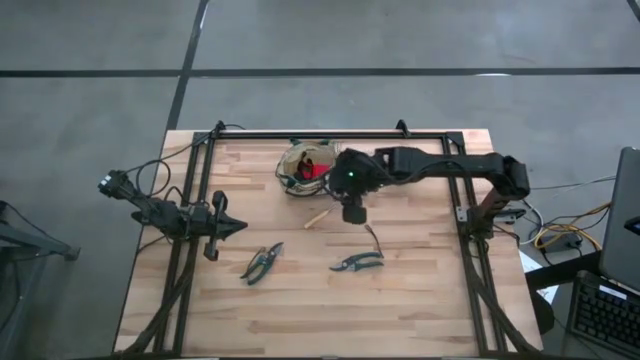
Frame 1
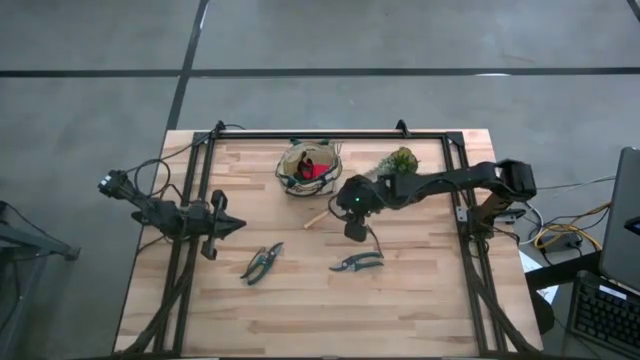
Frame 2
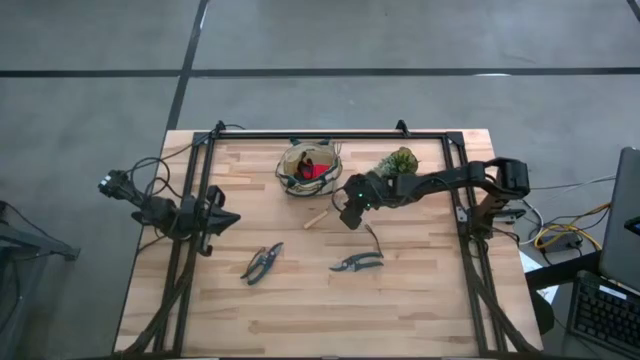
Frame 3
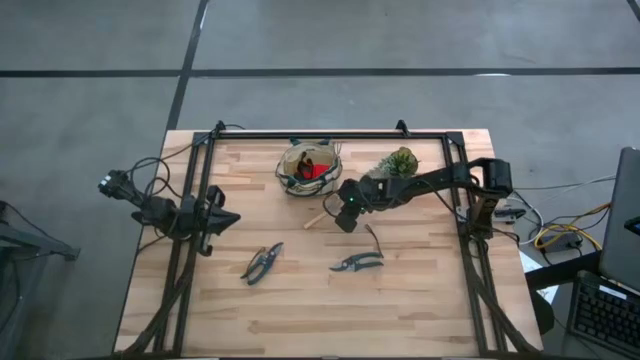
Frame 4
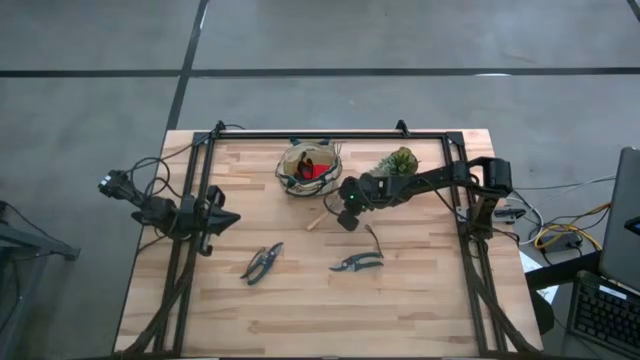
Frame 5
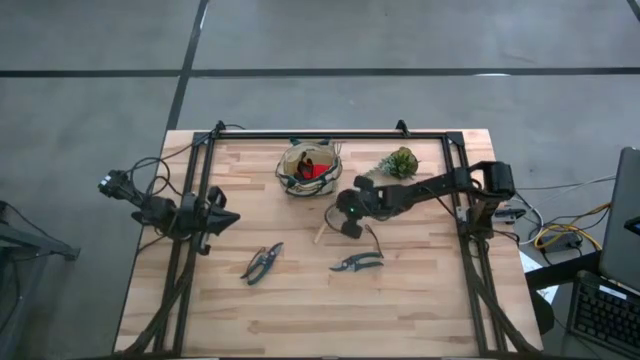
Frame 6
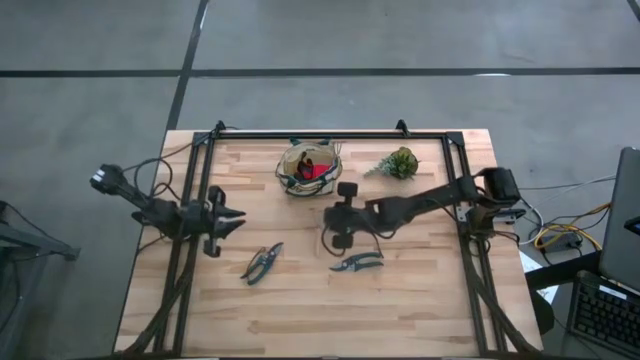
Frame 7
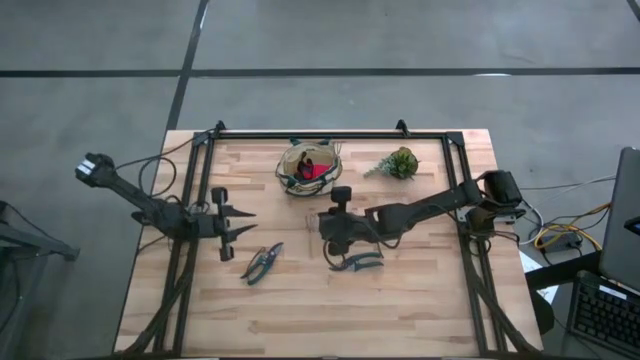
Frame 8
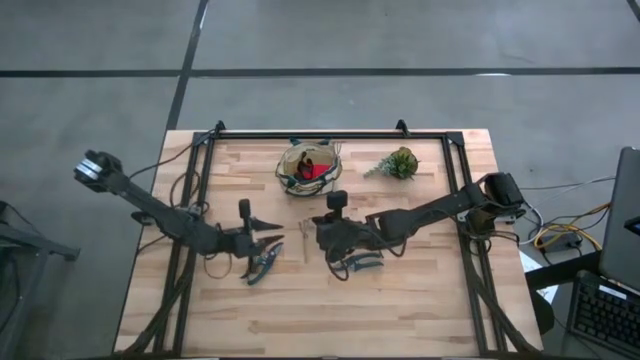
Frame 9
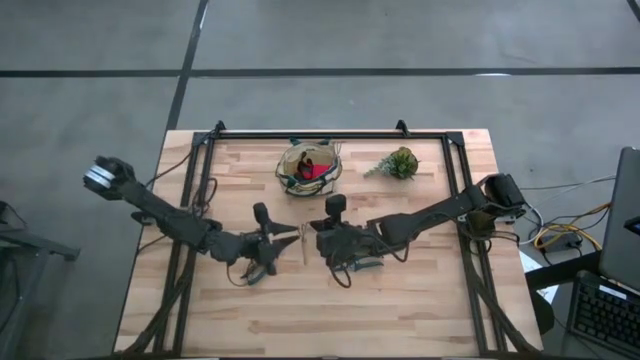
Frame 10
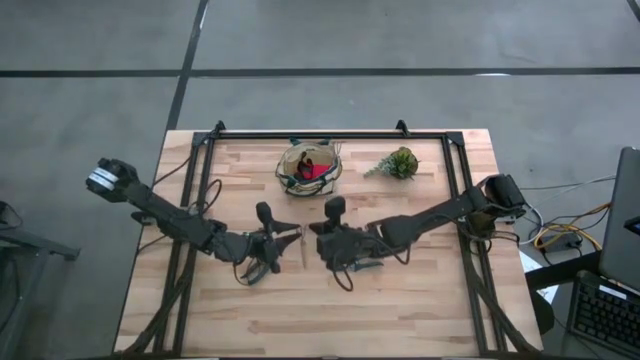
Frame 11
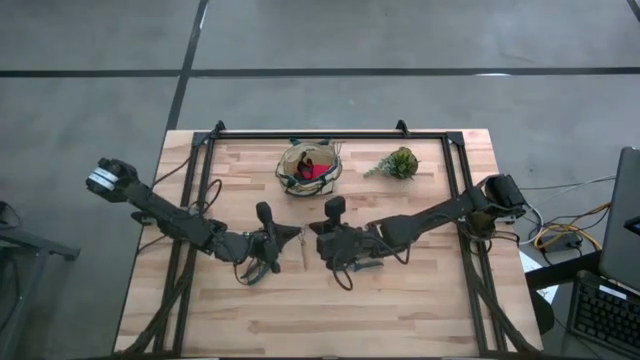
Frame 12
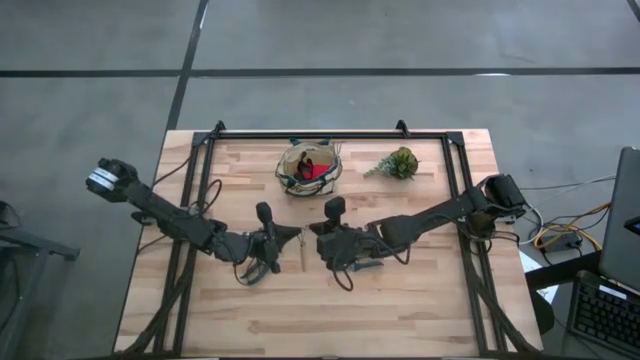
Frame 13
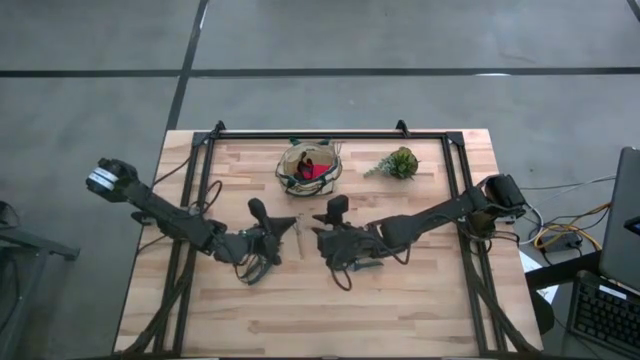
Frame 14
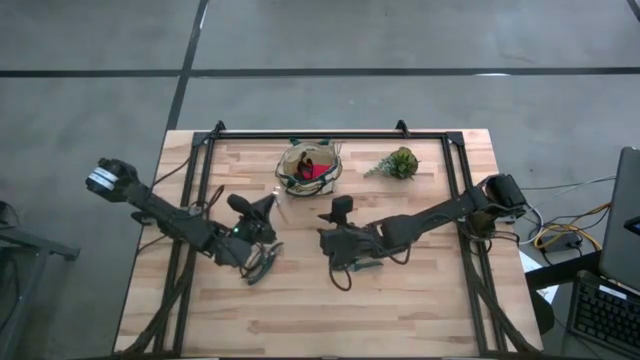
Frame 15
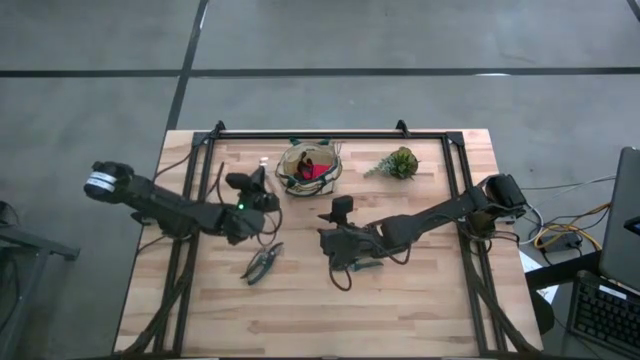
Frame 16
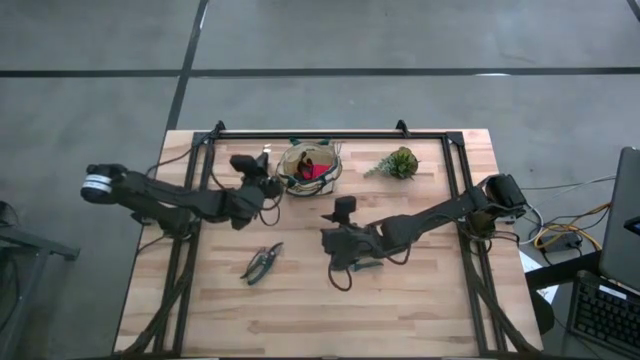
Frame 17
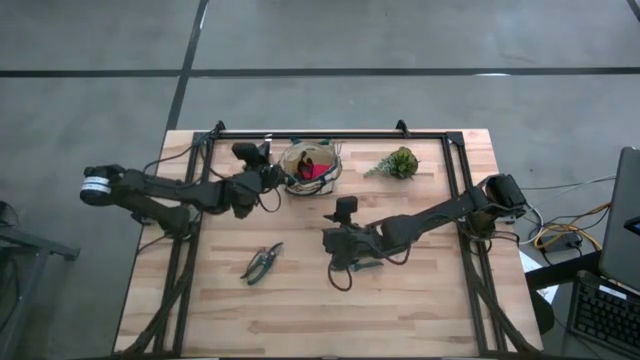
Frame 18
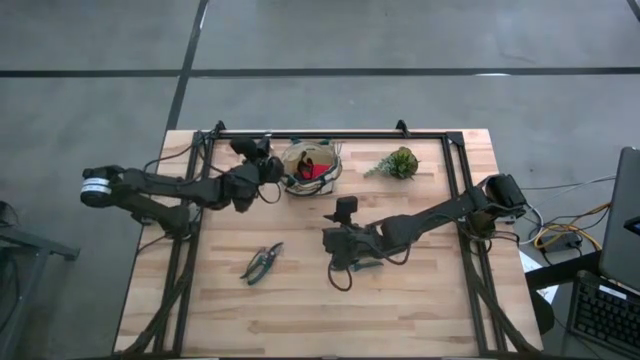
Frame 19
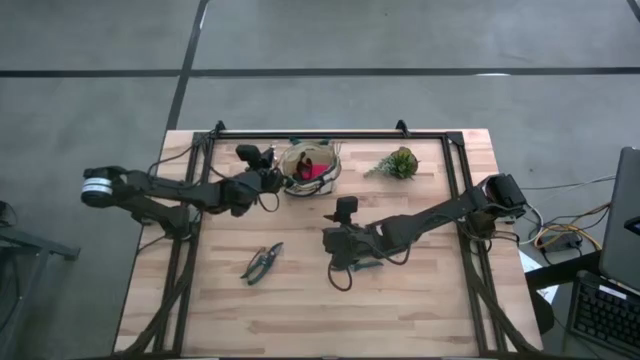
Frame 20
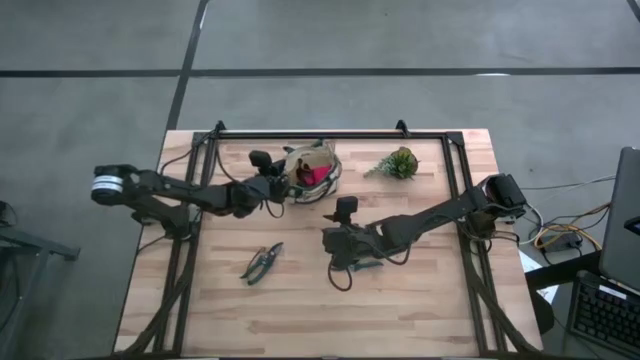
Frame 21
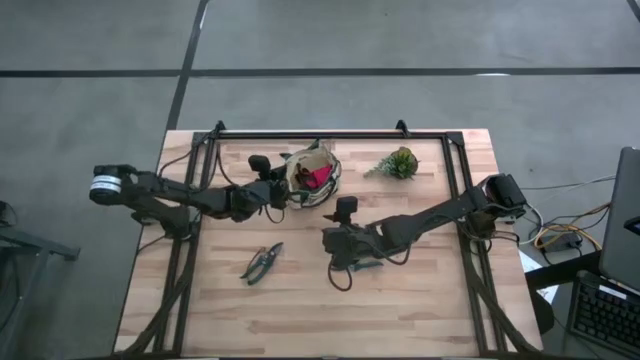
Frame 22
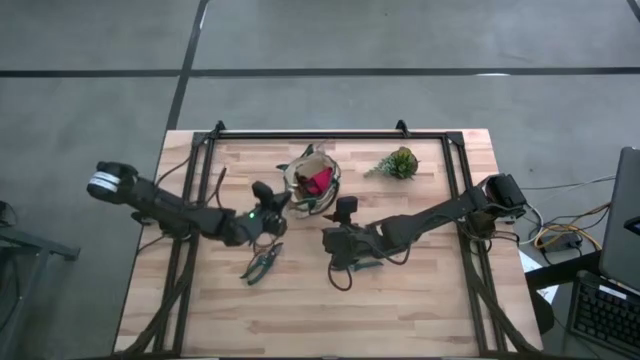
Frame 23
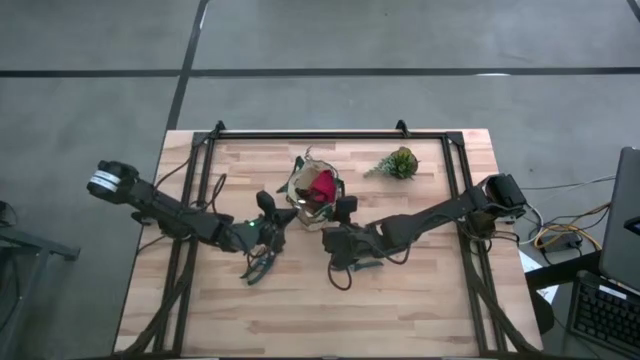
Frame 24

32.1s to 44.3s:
Task: Pick & Place Garden tools in Gardening bag
Put the hand rake into the gardening bag

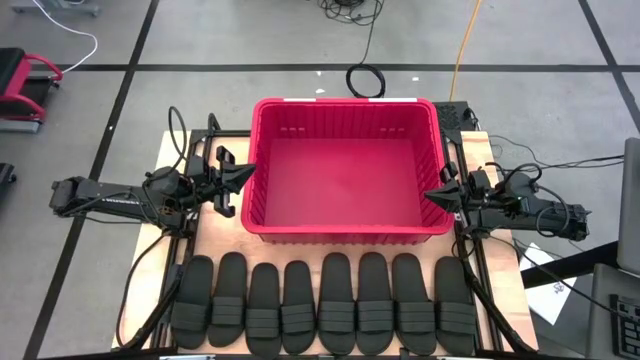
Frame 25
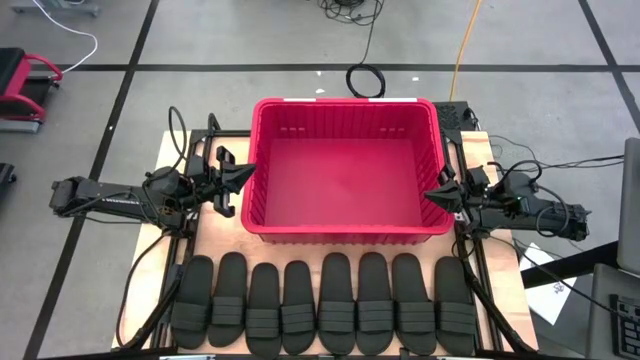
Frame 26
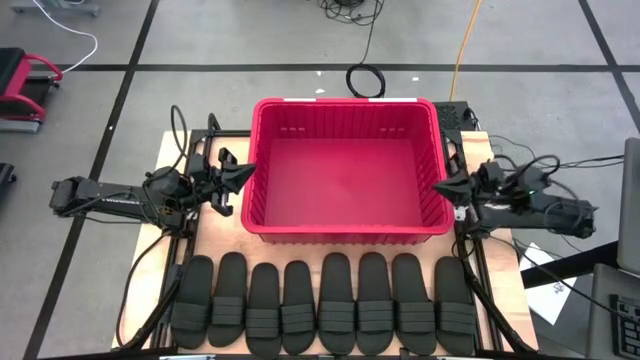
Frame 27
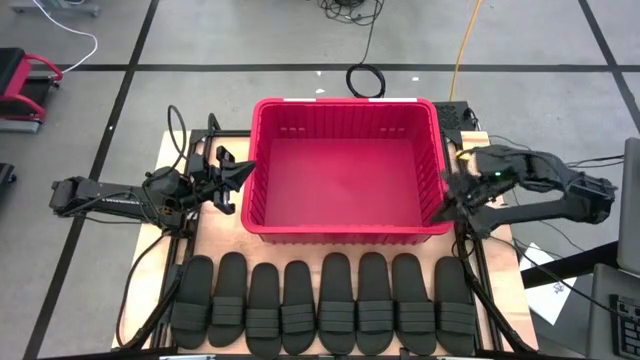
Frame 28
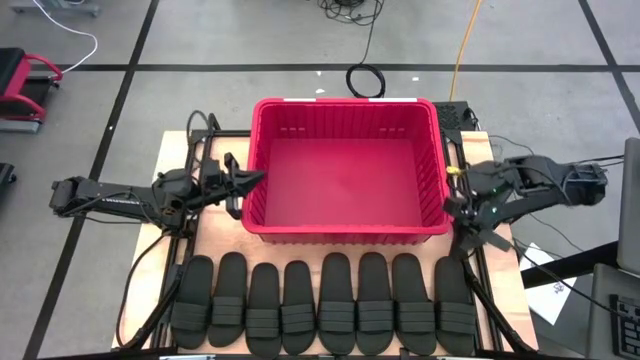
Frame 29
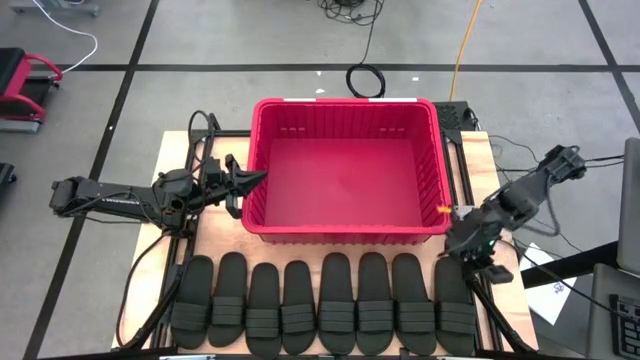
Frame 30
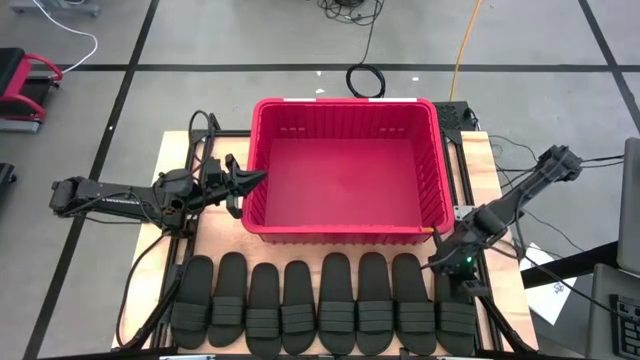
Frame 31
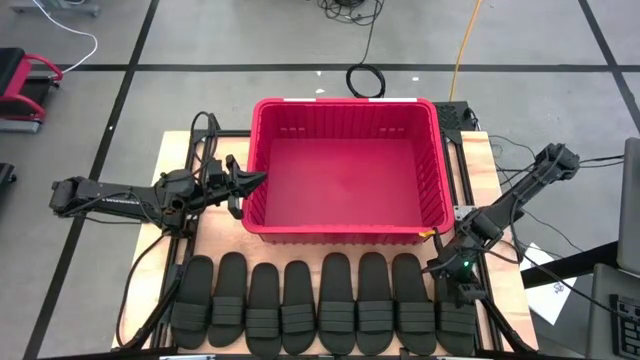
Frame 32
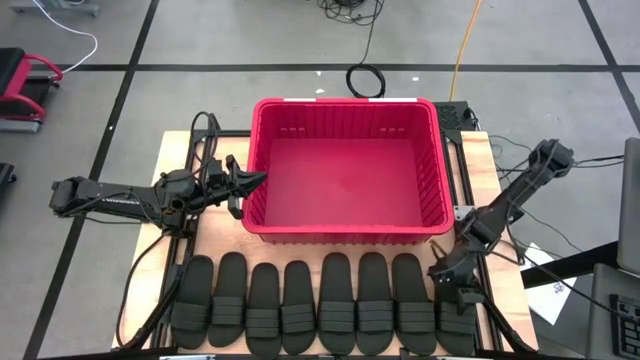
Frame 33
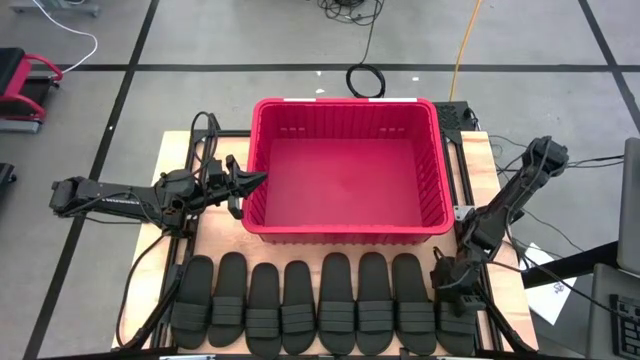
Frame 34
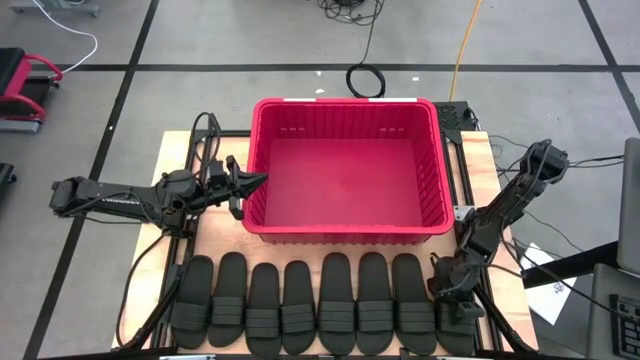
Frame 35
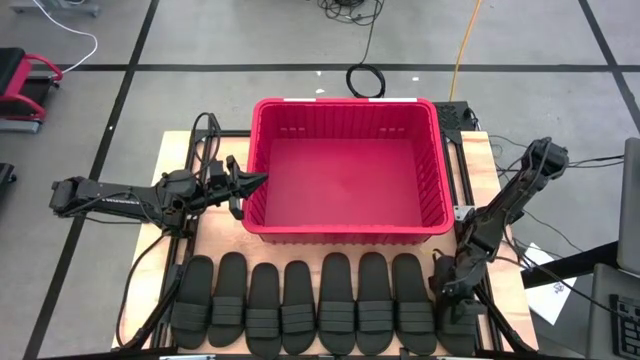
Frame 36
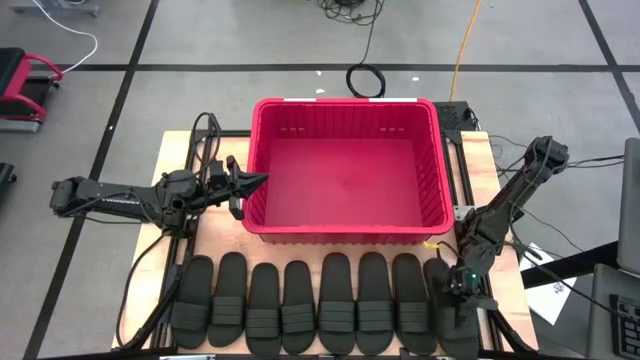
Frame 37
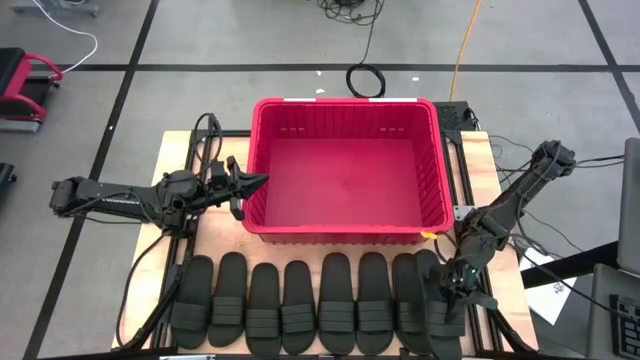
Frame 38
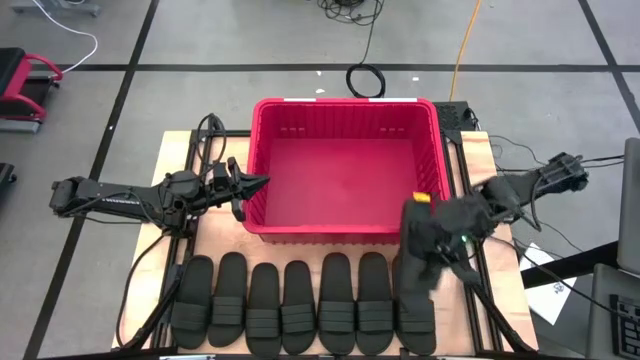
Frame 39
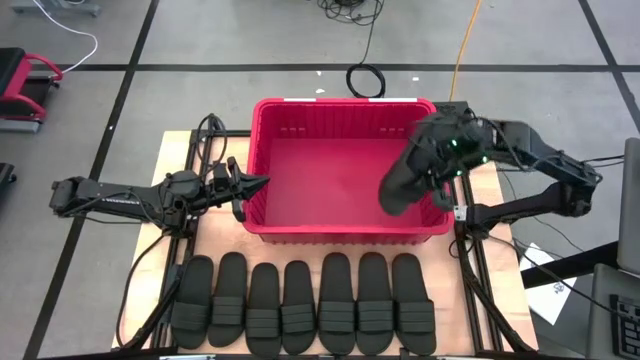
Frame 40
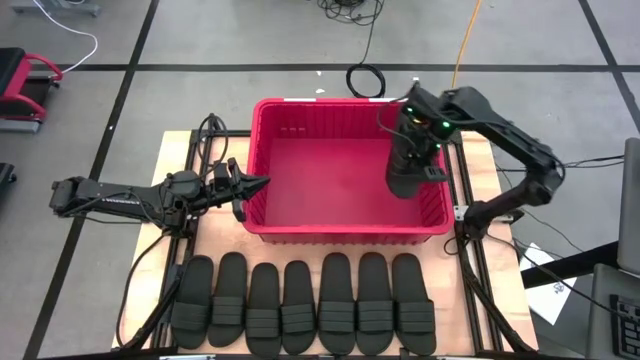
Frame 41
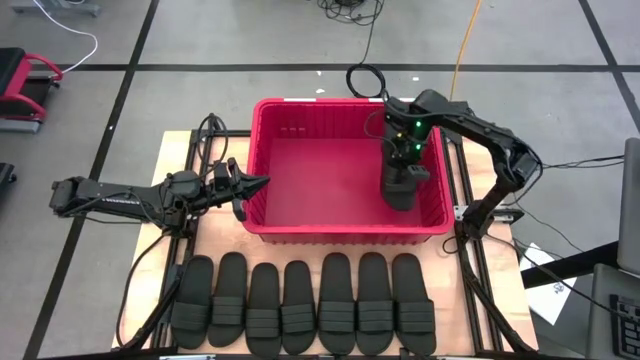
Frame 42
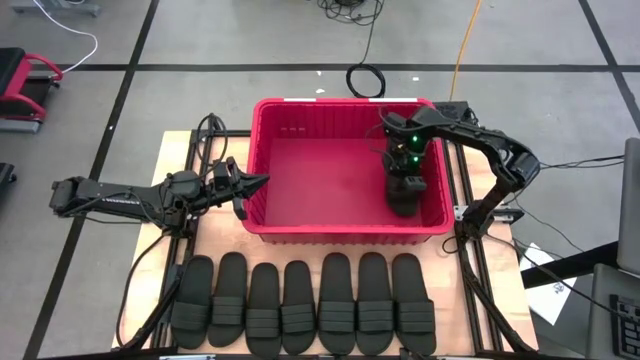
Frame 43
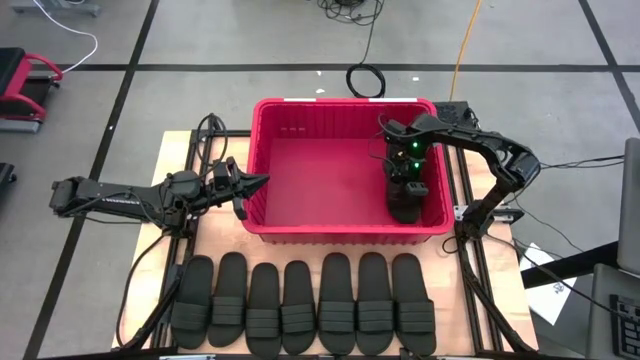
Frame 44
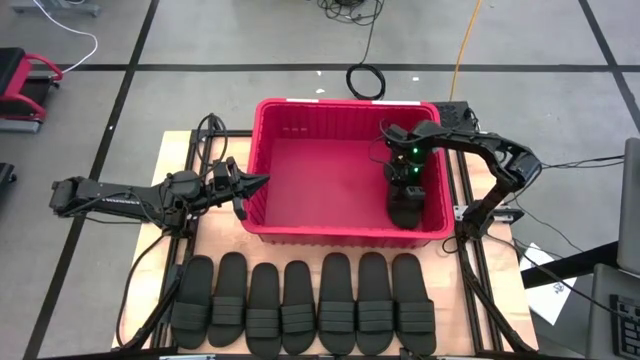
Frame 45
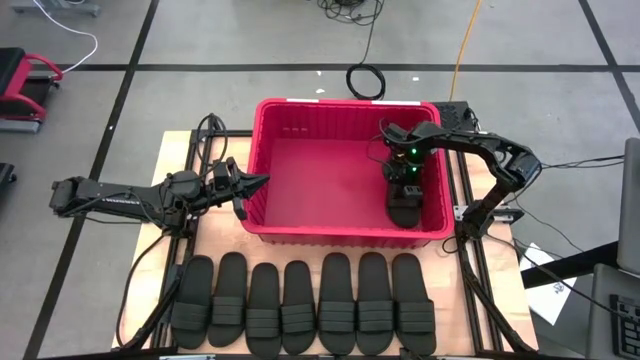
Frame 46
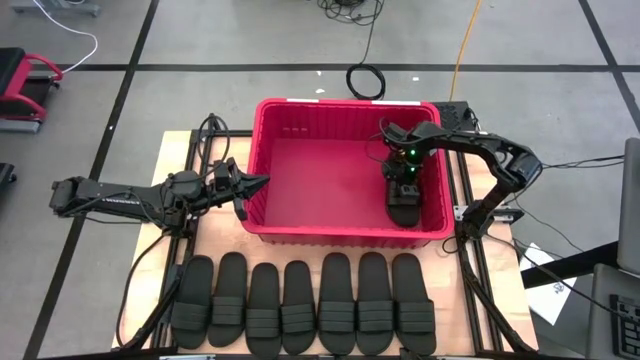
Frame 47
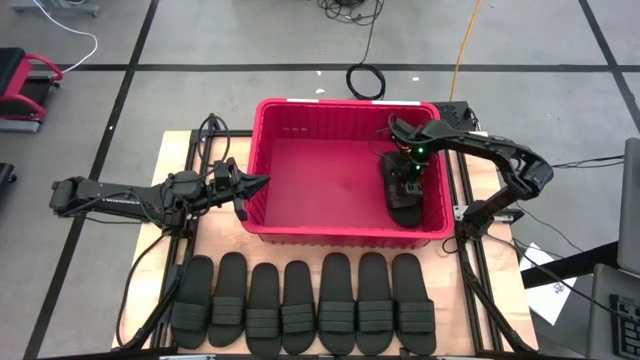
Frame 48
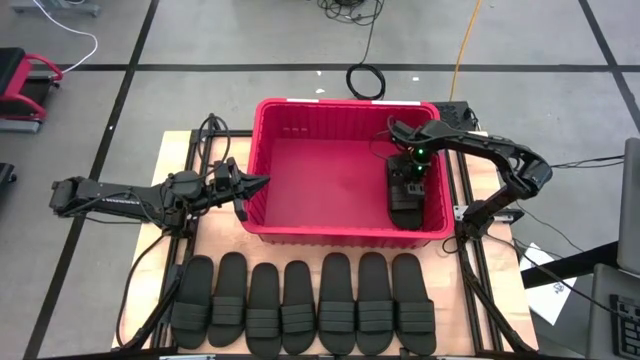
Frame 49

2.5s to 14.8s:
Task: Pick and place slides into bin
Put the black slide into the red bin
